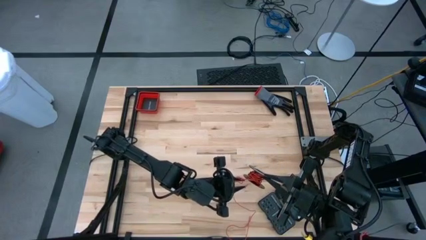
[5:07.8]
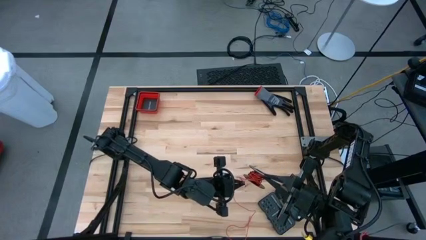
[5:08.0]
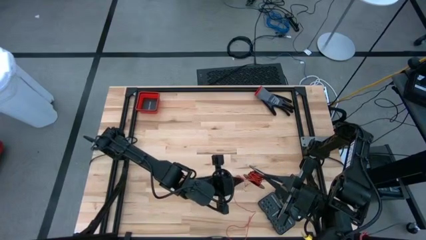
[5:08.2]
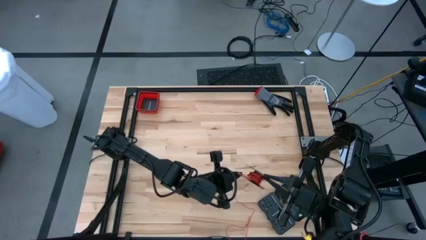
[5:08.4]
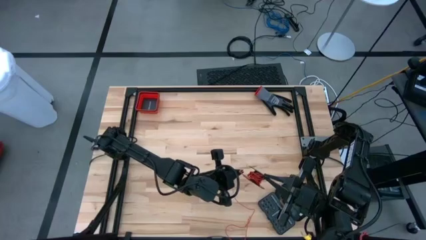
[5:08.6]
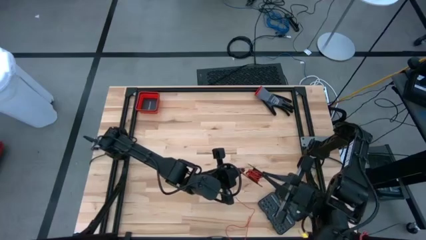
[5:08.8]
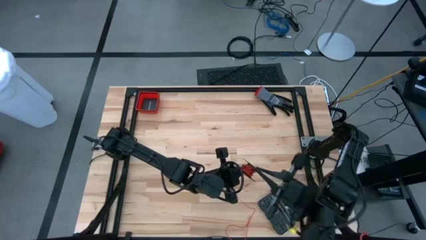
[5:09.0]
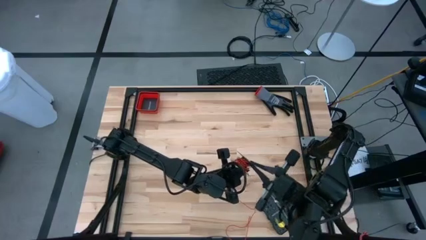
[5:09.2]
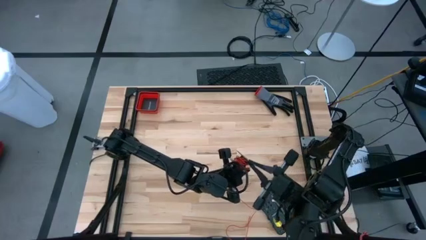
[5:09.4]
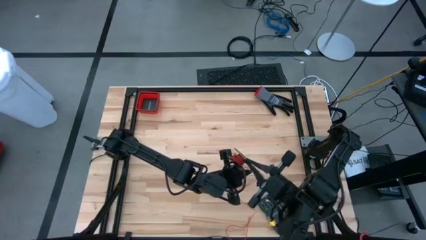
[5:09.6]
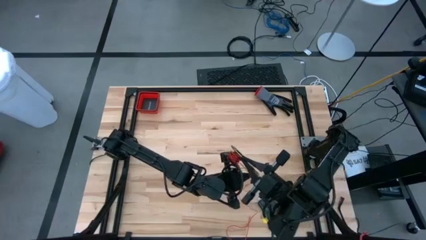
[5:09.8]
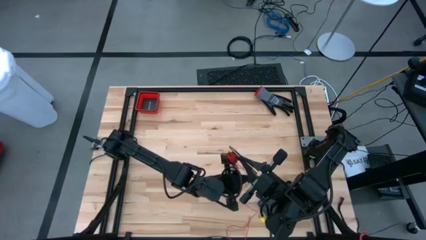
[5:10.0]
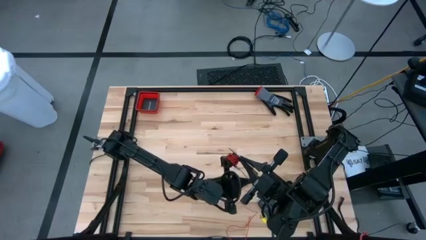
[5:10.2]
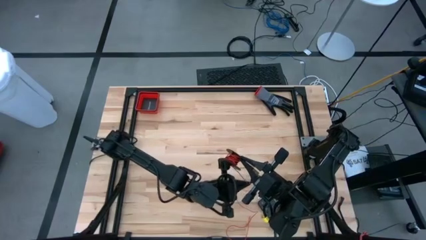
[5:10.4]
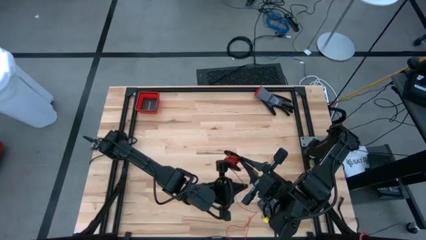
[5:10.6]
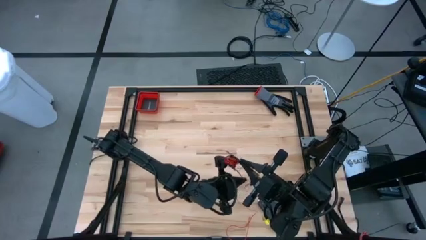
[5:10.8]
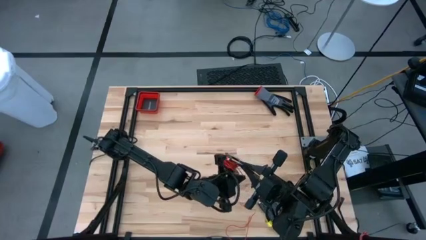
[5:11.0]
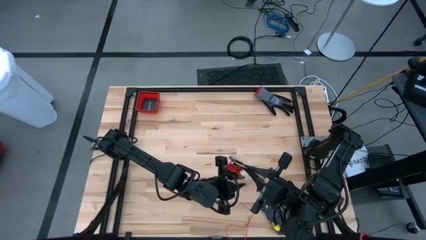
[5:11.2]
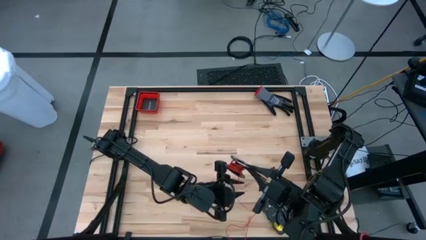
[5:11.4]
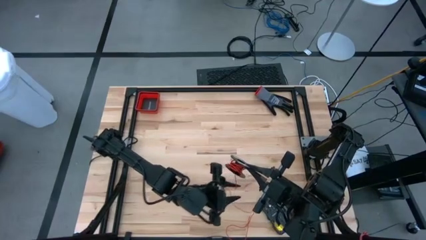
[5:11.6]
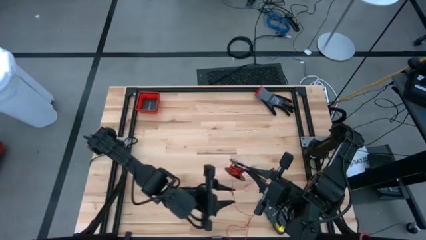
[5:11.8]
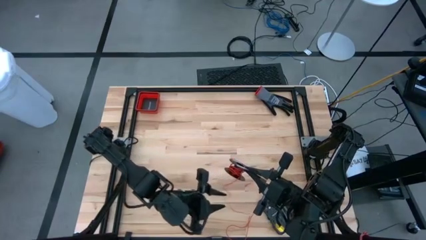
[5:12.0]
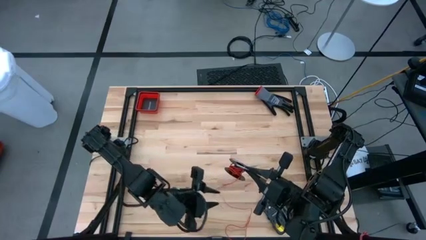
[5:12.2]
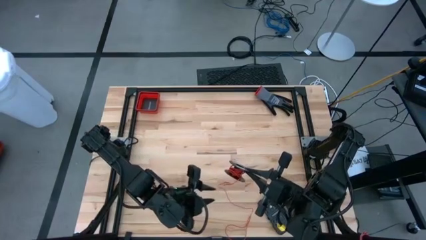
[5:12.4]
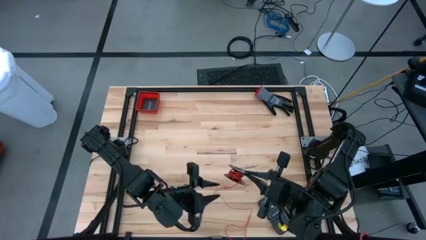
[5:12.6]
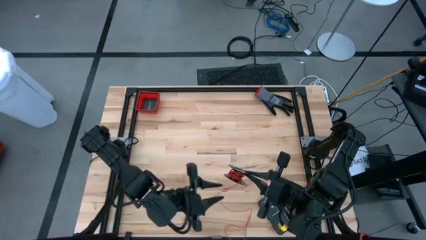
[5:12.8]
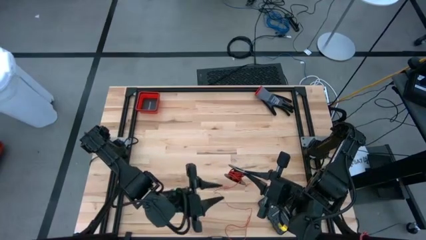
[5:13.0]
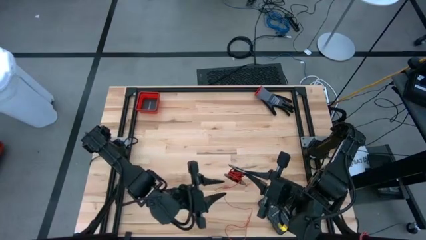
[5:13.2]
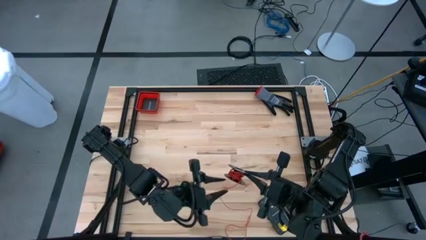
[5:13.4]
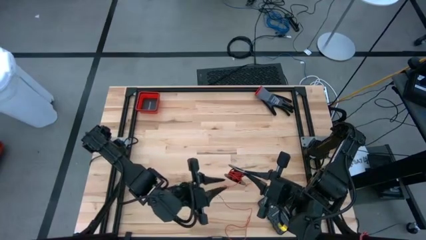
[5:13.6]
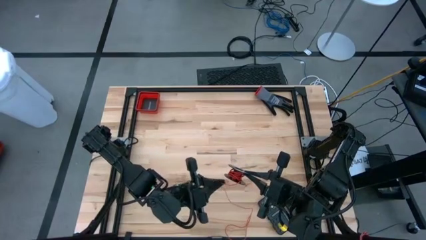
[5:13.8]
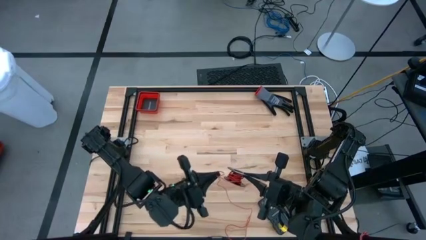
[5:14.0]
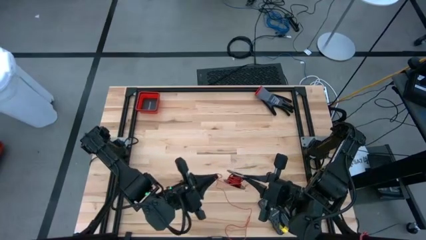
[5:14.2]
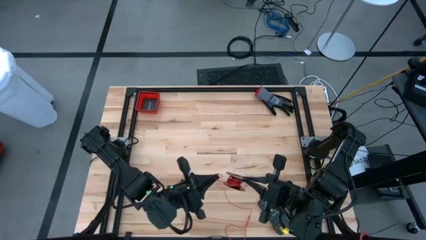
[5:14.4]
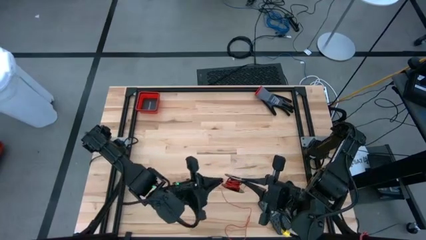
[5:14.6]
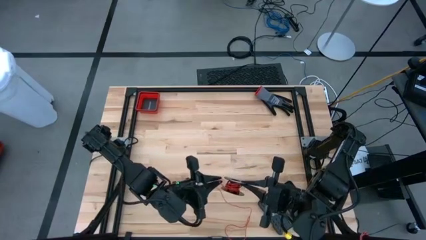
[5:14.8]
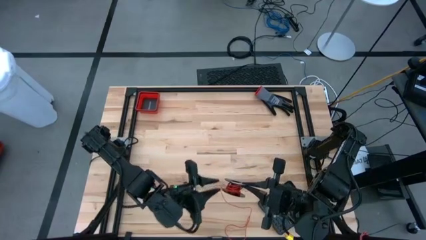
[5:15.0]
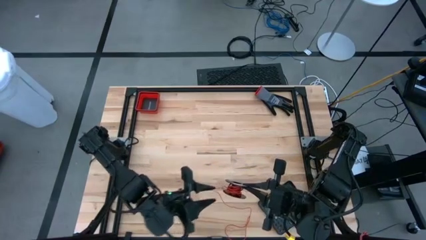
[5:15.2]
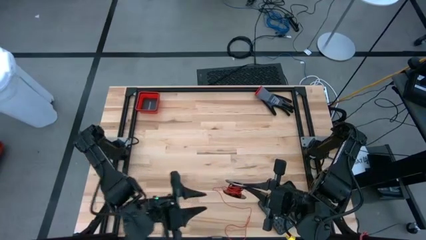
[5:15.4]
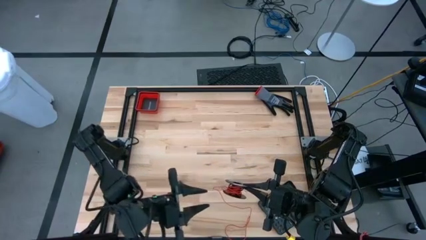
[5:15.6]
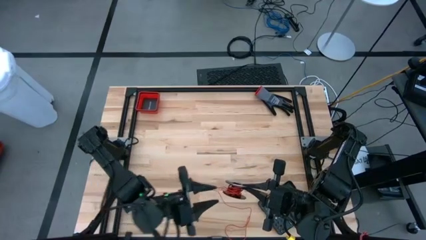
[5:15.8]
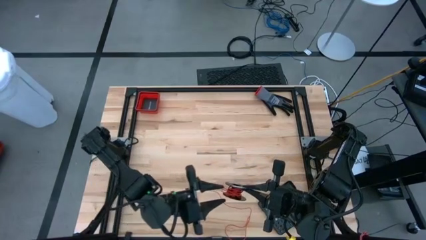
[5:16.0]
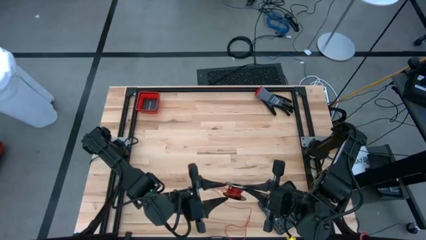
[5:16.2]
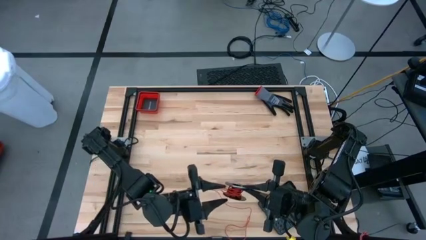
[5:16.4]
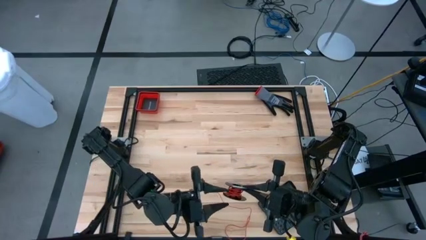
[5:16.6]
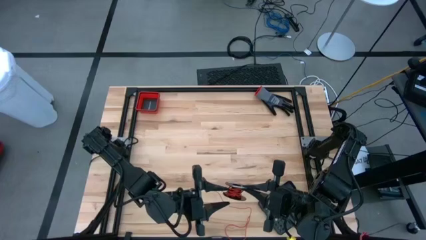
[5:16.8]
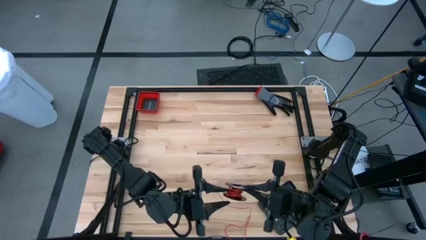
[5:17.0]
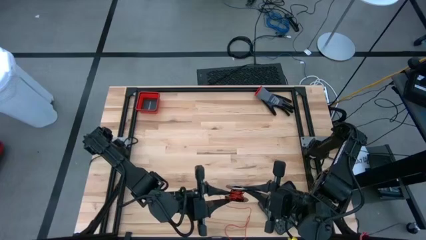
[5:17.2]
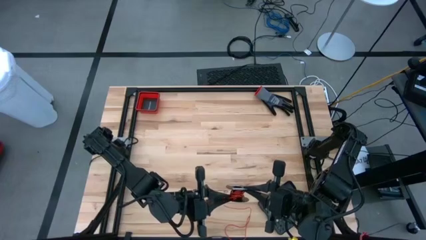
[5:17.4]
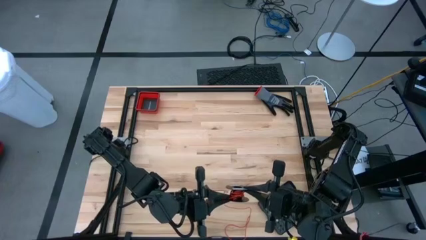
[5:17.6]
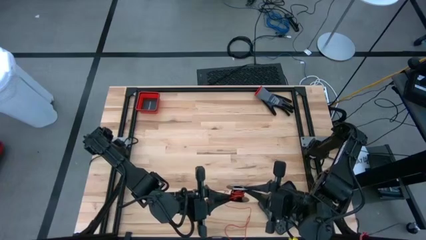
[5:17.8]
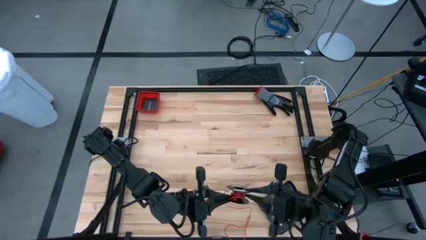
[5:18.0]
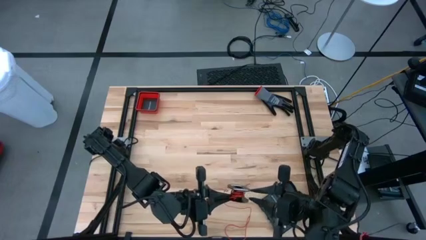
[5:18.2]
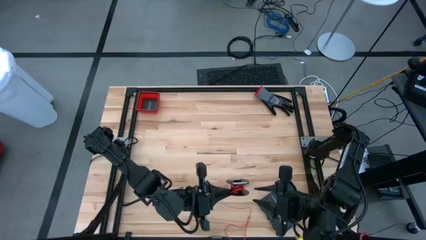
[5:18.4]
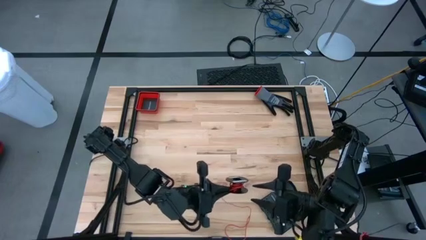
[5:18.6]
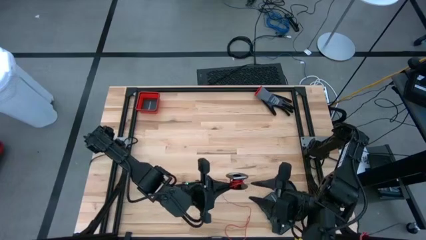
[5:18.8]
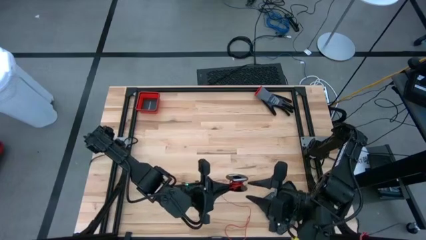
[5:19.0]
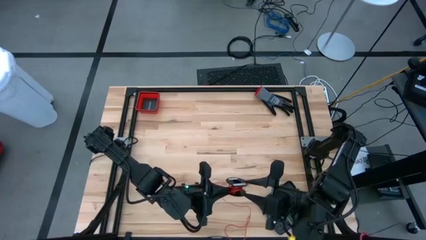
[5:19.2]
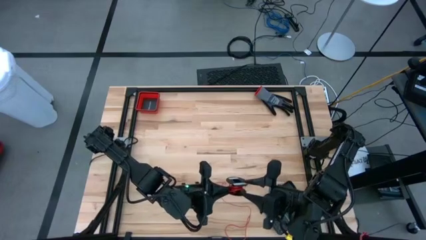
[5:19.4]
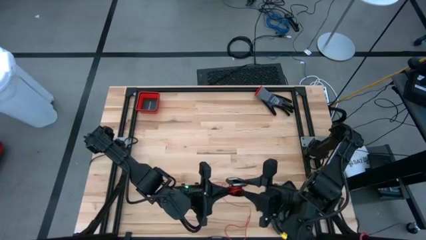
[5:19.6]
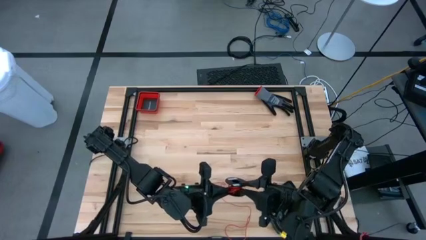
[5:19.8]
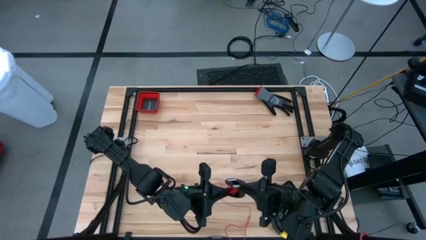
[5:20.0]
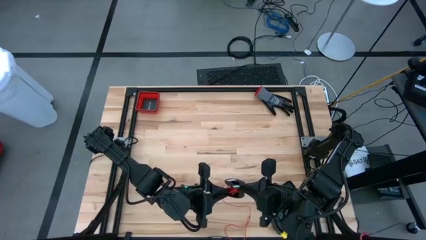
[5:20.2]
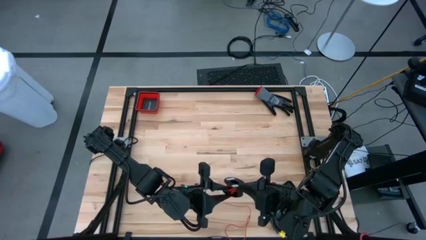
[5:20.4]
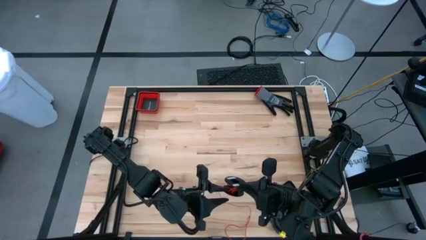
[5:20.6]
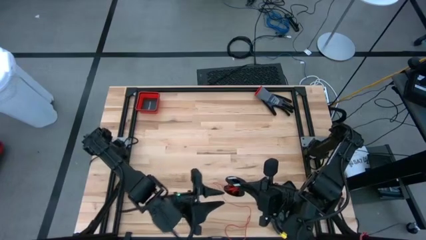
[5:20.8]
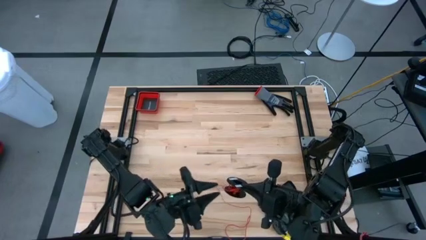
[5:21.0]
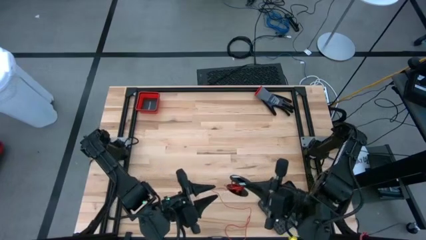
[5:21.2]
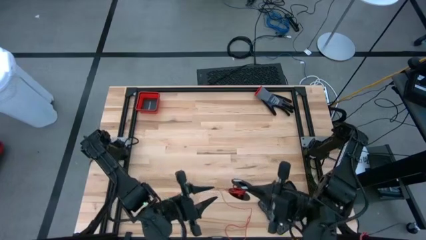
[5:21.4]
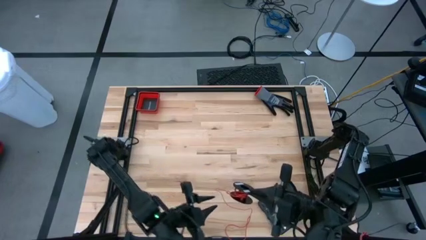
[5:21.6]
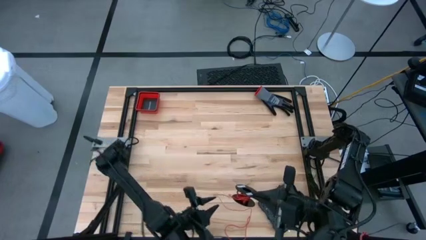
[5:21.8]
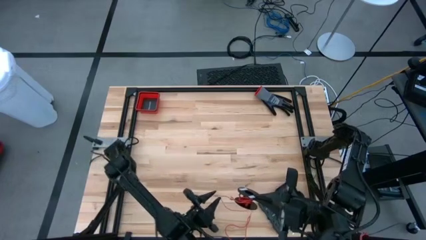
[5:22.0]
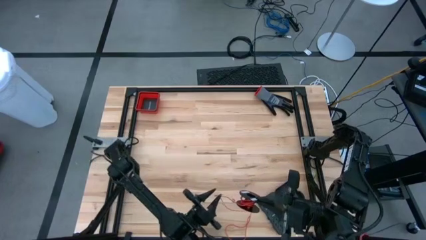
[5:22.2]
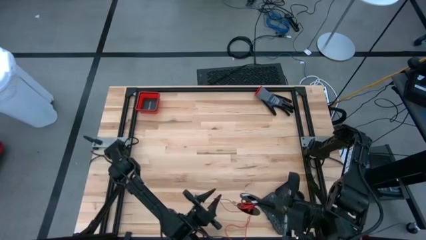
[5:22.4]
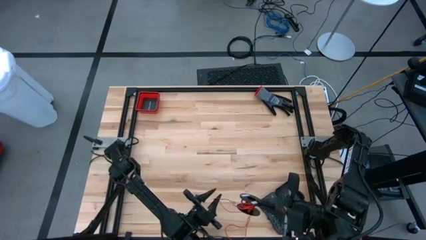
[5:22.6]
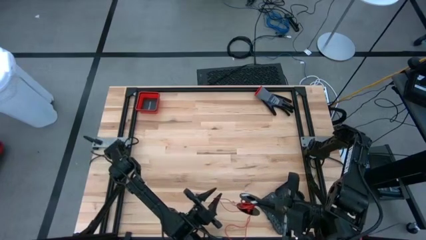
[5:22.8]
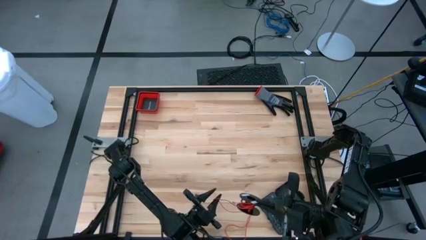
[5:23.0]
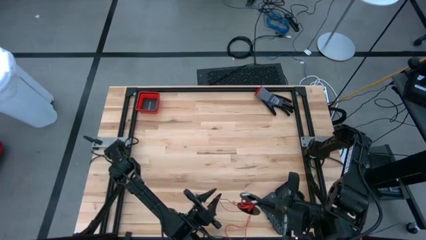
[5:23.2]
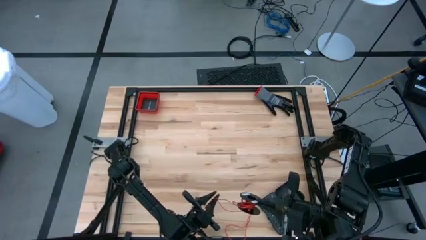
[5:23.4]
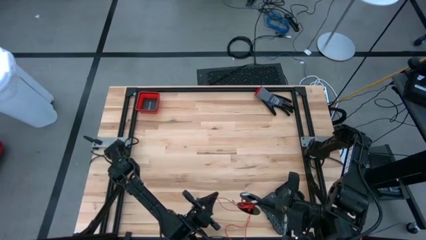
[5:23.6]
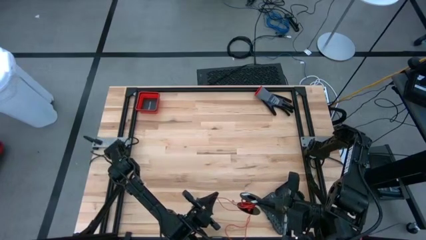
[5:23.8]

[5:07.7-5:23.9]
Task: Coil cords
Coil the red wire onto the spool

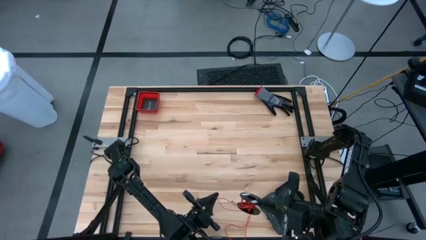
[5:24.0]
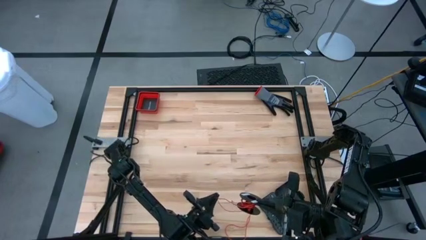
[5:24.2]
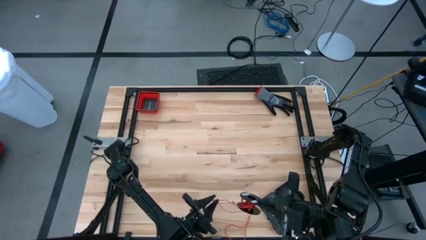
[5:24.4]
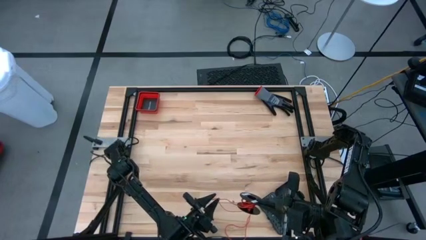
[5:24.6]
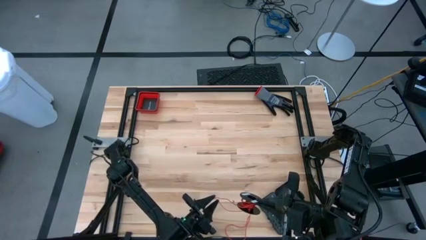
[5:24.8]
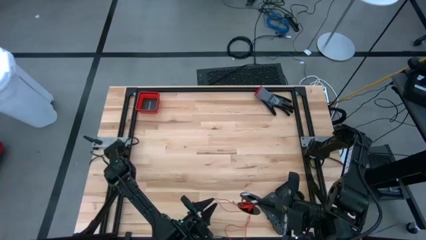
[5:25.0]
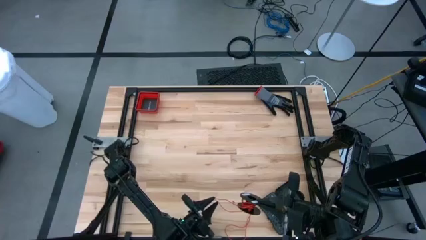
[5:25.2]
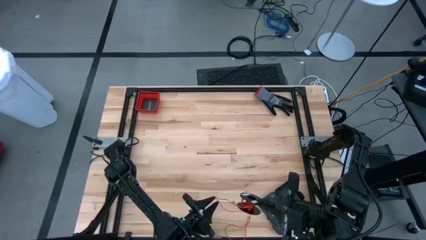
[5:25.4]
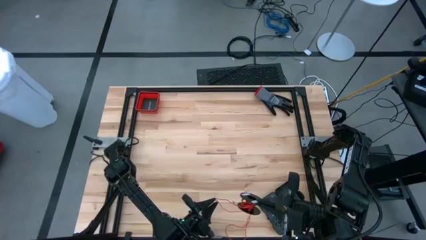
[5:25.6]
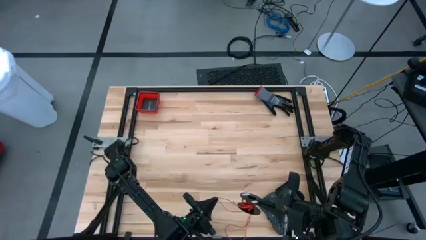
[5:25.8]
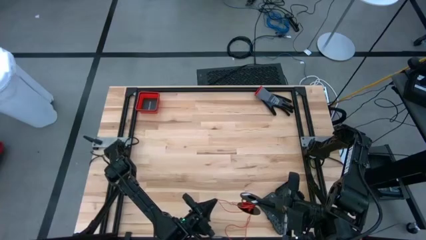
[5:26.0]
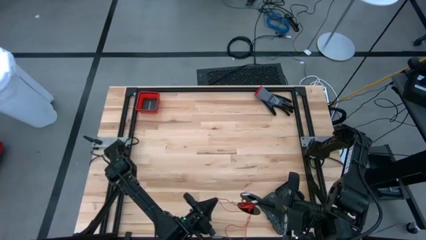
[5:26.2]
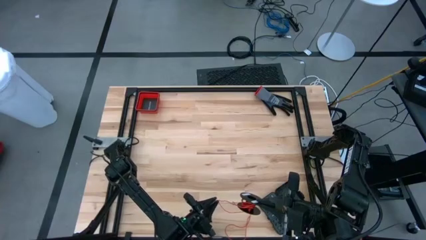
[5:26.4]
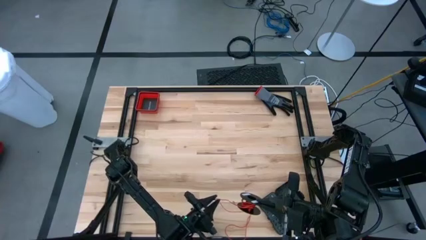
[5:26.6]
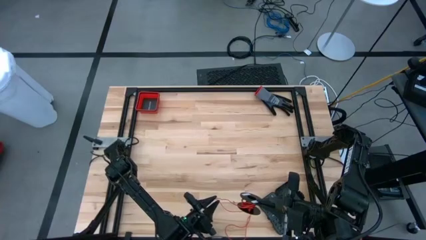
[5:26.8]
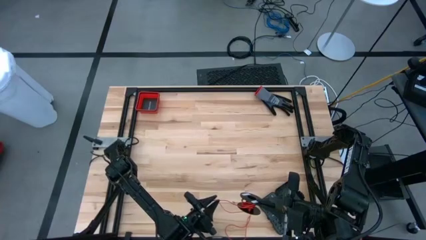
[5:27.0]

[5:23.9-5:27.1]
Coil the red wire onto the spool
